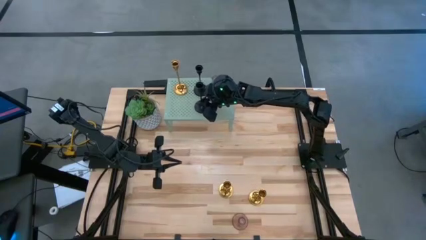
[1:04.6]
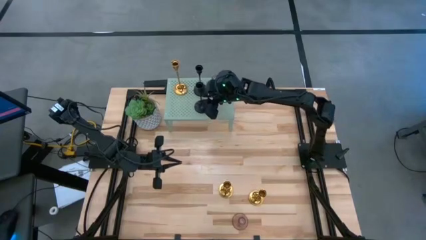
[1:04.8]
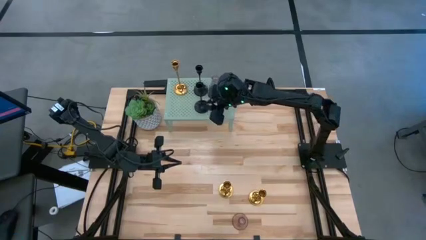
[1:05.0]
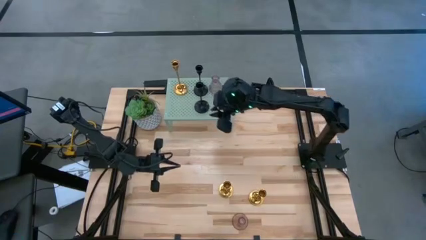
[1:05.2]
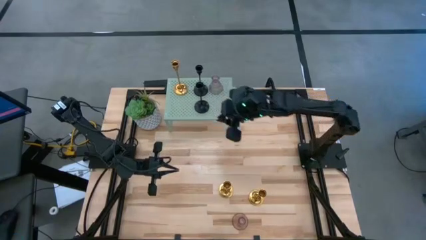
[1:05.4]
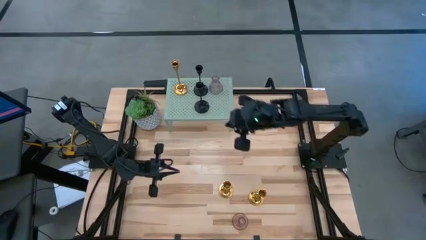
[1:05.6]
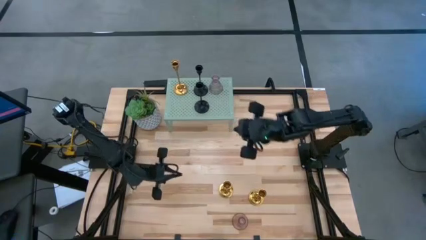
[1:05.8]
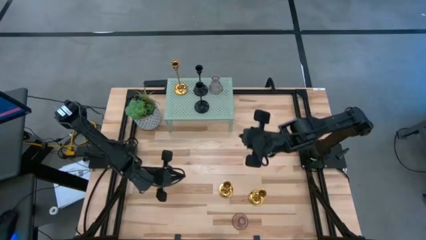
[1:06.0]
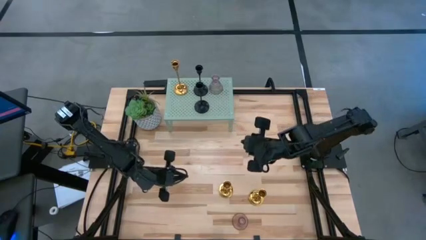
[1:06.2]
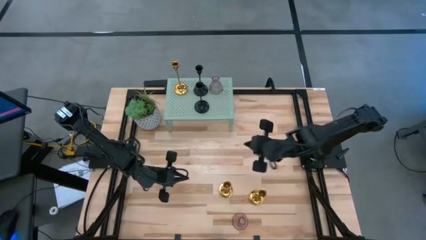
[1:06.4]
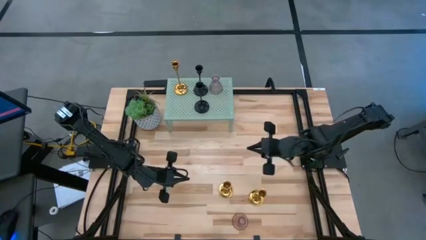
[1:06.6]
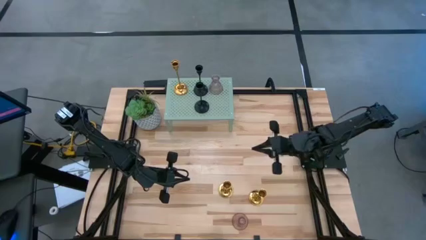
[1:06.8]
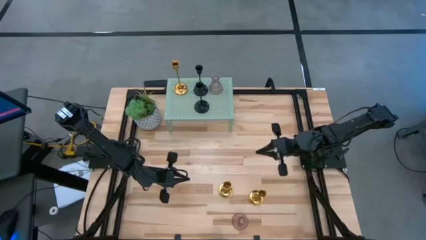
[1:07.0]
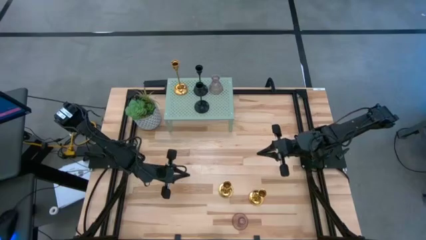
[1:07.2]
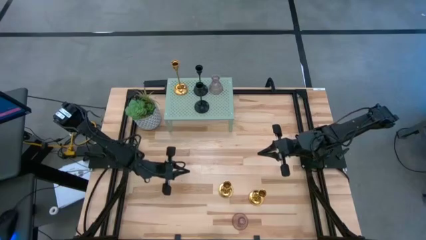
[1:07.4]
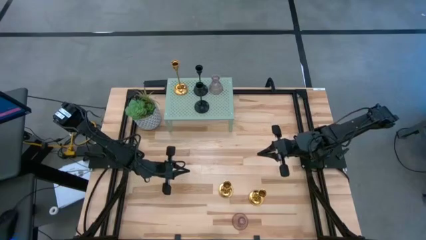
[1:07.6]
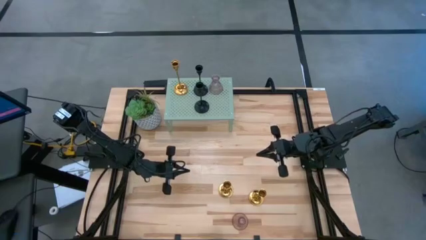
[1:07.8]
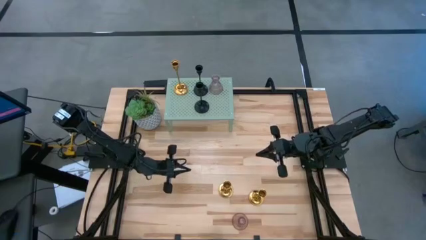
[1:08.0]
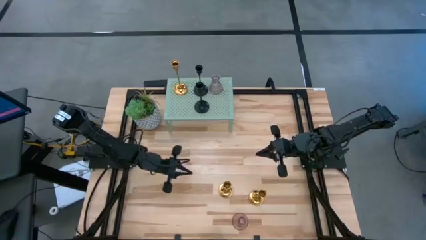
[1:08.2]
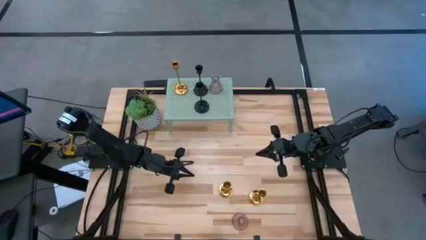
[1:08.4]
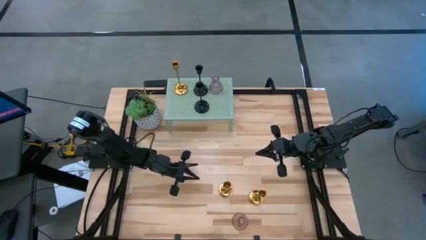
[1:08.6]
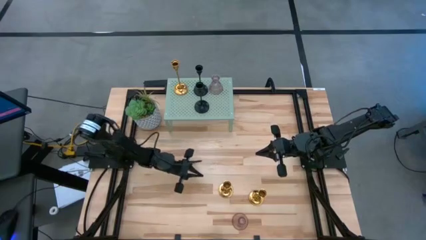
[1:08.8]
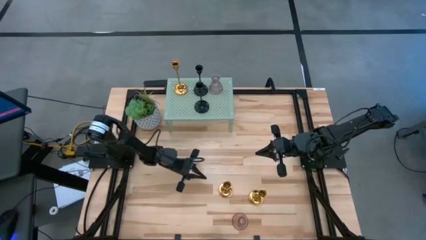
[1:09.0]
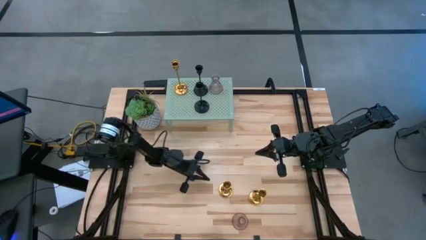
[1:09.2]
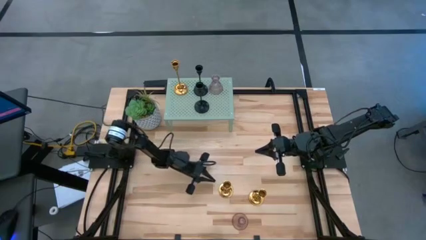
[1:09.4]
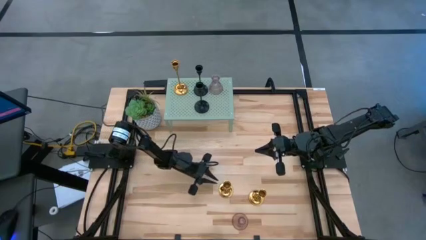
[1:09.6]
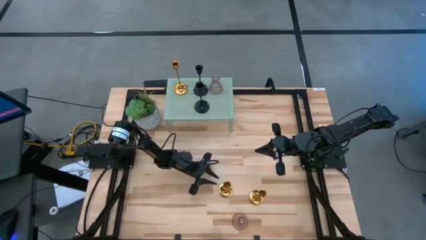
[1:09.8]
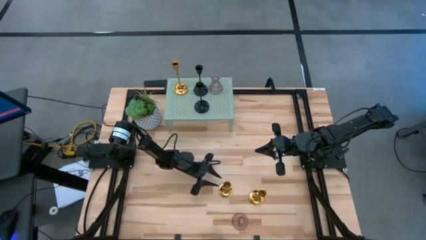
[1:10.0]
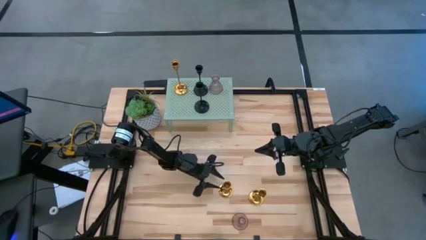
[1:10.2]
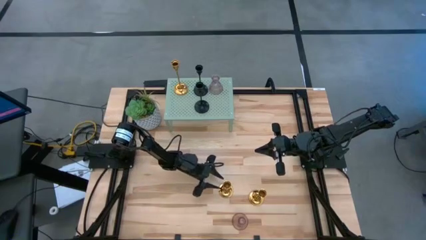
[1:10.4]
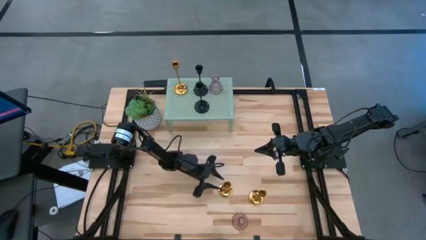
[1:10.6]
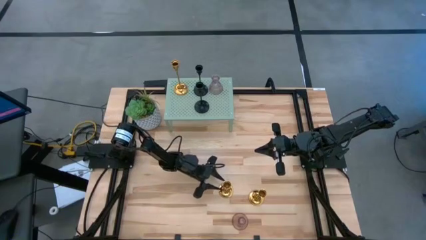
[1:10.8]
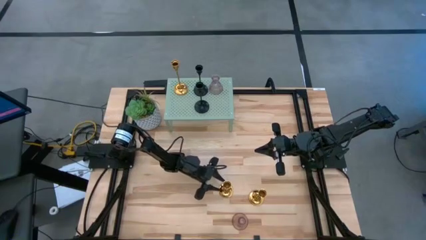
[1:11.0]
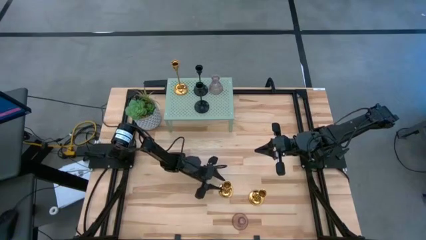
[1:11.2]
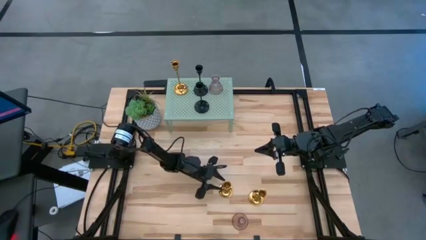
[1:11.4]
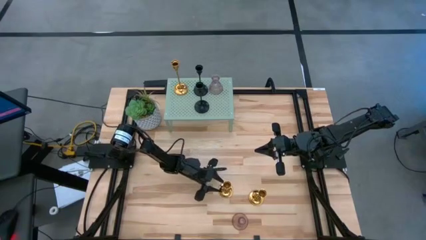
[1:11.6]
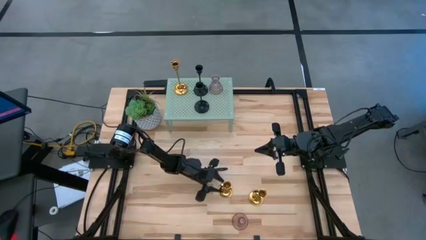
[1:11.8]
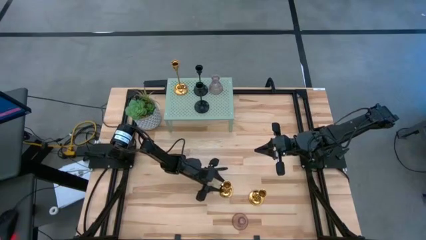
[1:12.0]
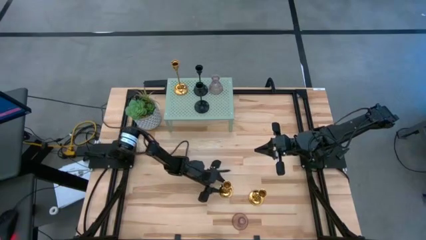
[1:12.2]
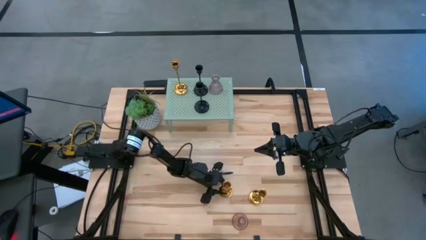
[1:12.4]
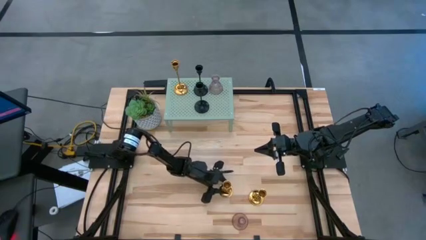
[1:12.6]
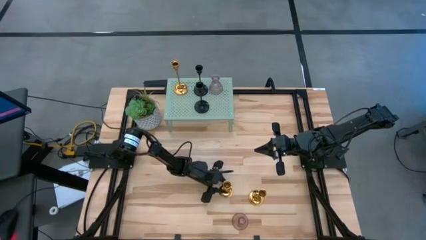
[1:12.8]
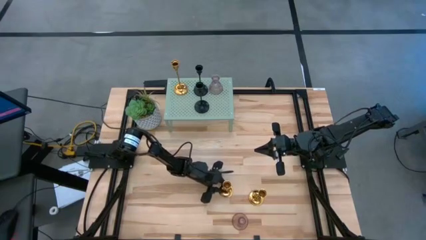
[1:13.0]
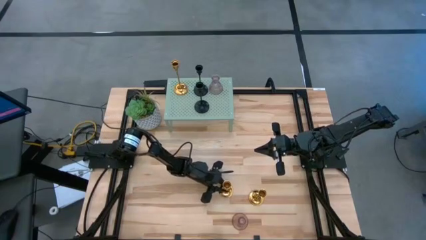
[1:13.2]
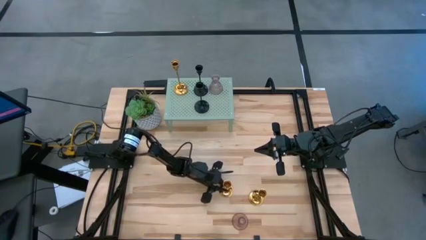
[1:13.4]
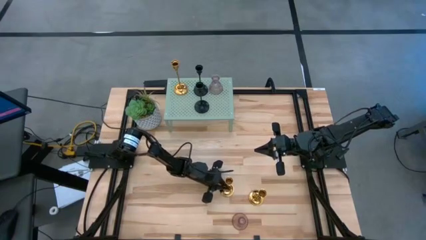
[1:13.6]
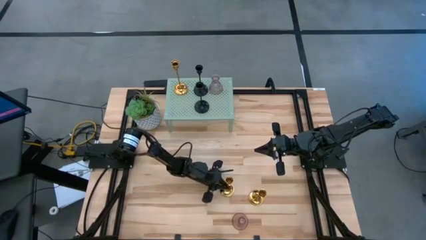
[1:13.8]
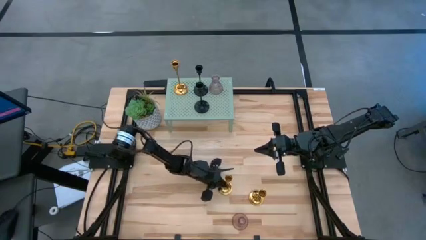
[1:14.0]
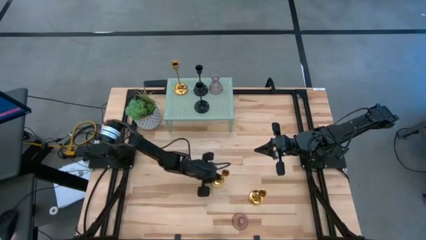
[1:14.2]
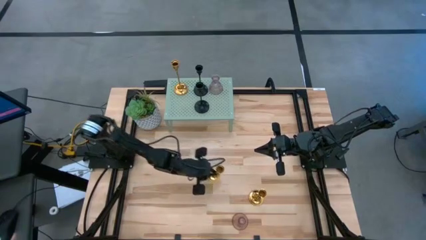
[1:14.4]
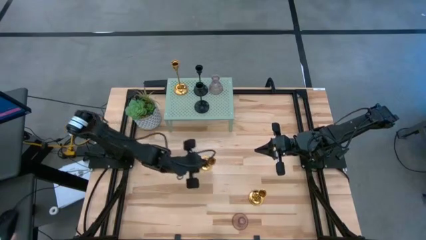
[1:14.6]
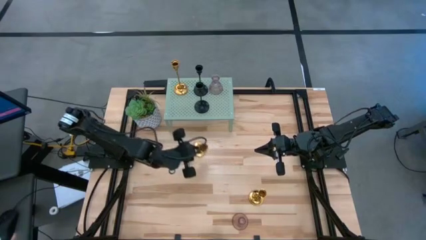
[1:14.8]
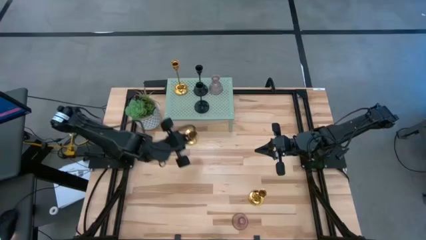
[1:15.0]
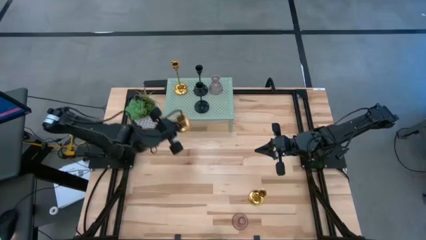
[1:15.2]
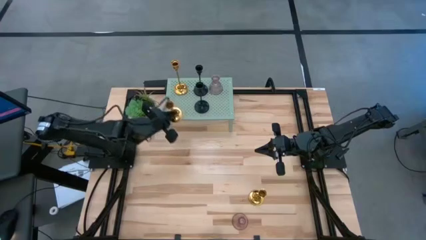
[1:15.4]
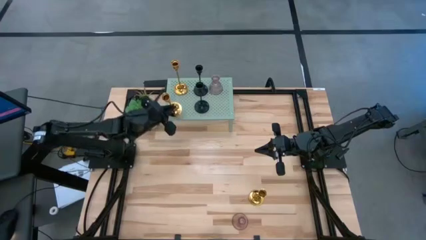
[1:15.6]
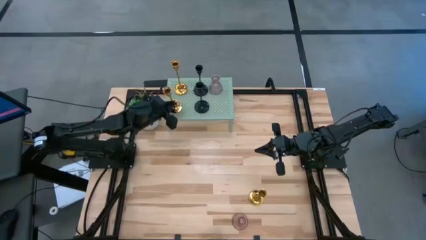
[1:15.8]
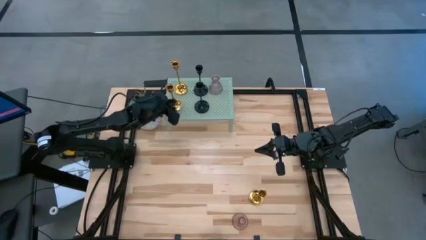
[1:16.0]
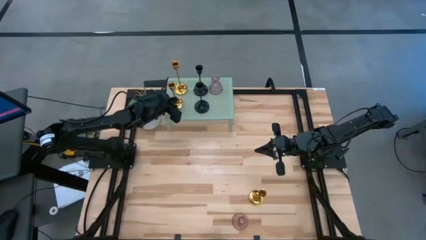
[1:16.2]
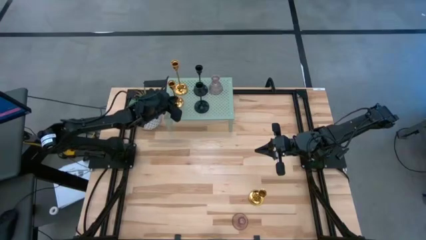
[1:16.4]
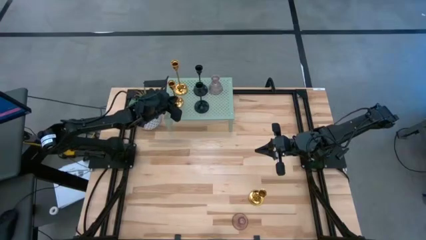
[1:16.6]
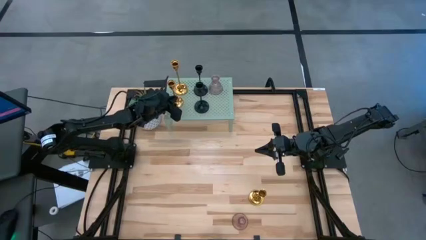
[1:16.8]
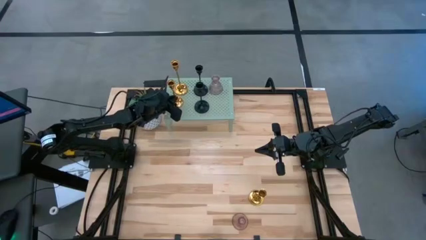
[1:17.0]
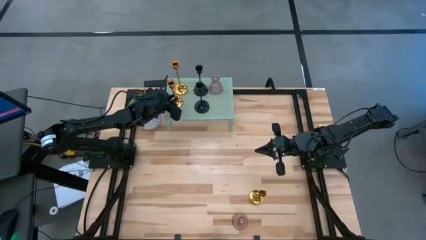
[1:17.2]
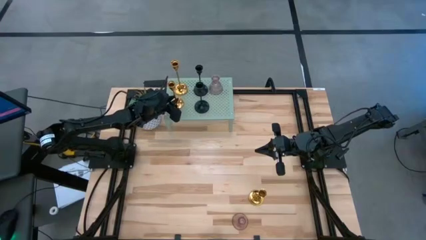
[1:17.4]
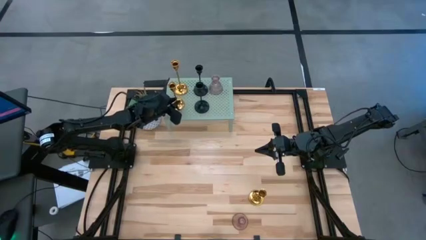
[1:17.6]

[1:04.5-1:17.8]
Task: Pick & Place candle stick holders
Put the left golden candle holder on the shelf

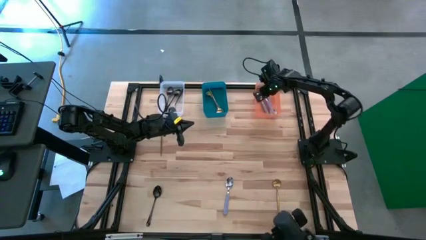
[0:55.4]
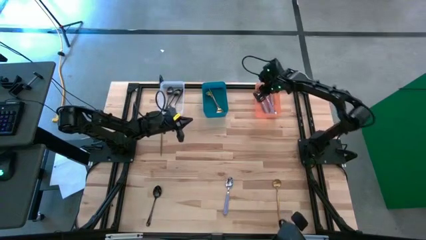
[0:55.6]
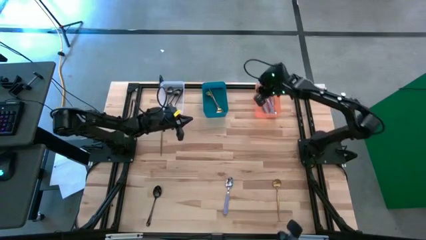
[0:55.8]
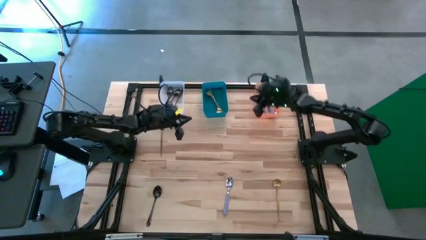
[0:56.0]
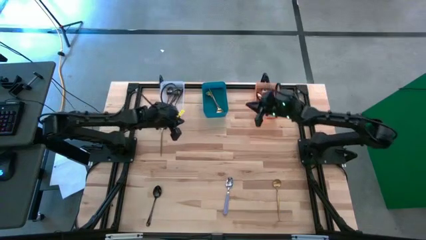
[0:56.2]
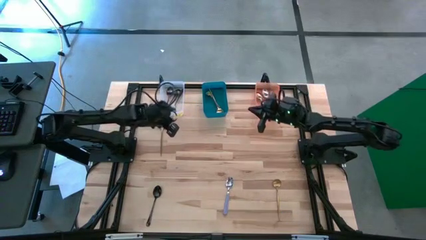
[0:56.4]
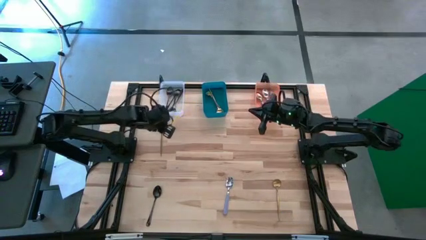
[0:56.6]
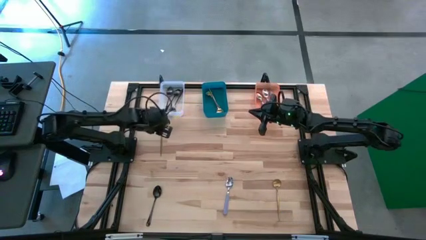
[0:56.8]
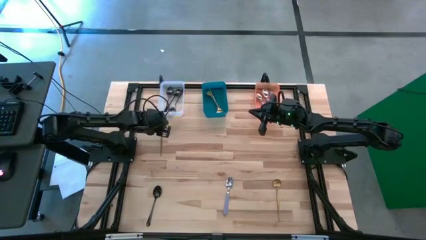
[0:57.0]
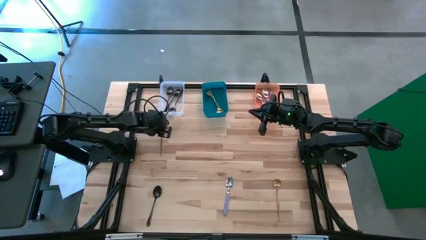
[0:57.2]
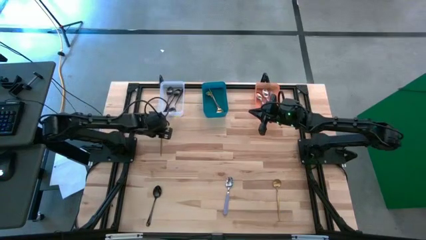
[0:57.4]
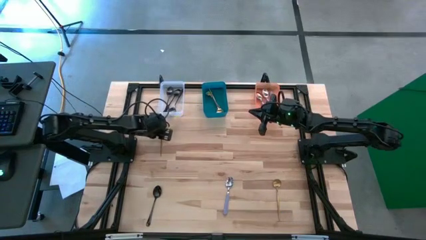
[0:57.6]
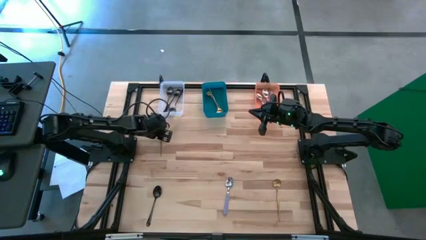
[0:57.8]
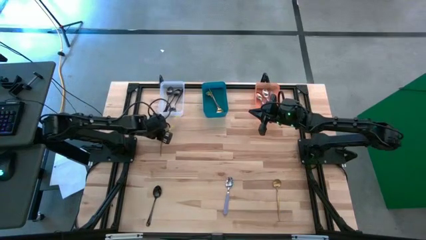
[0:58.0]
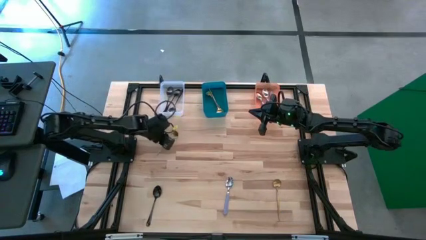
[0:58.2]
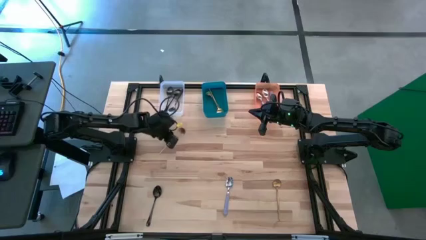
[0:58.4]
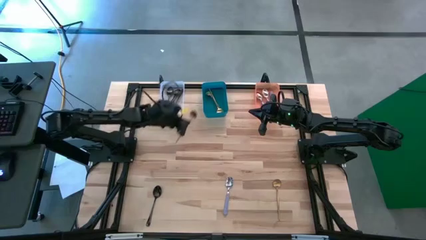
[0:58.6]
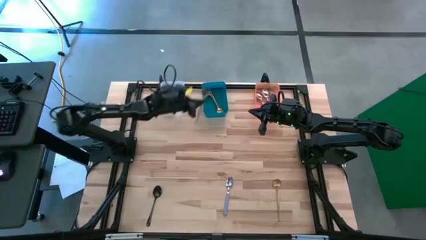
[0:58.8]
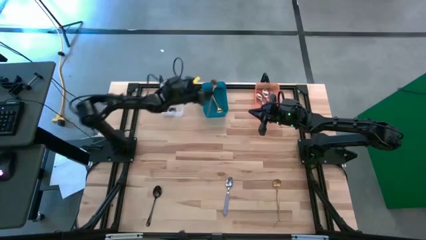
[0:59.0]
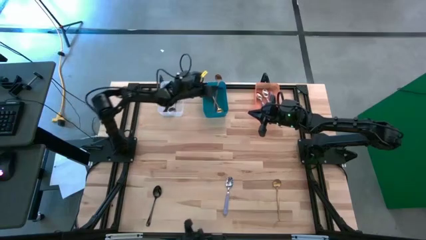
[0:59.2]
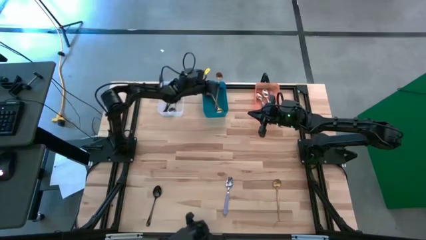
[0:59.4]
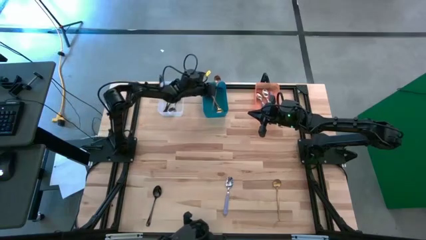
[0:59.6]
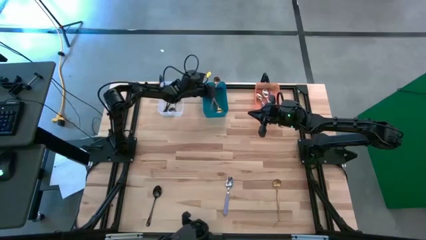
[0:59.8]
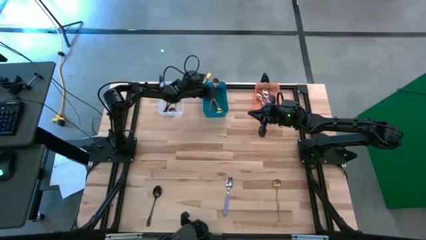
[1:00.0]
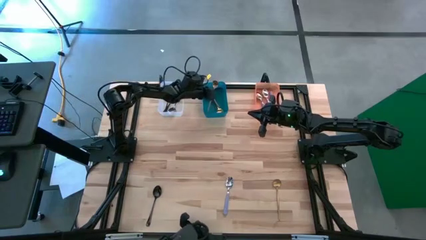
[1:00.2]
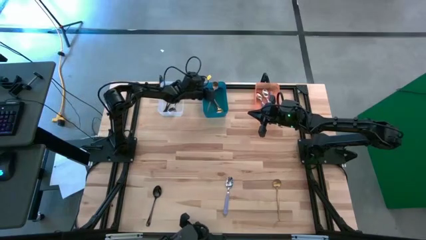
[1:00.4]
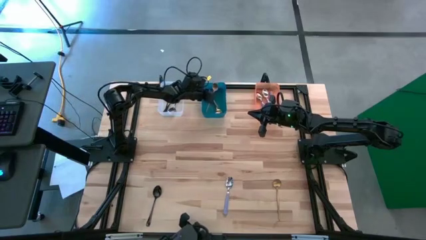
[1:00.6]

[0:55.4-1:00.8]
Task: Sort silverware by color (type)
Put the top gold spoon into the blue bin
